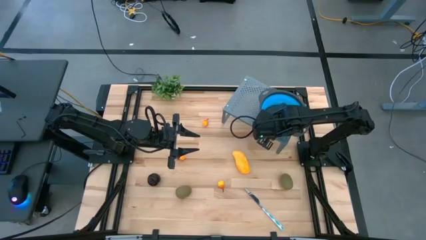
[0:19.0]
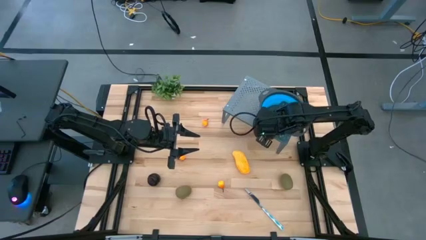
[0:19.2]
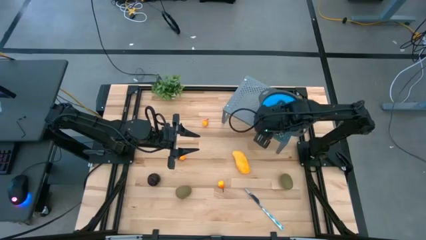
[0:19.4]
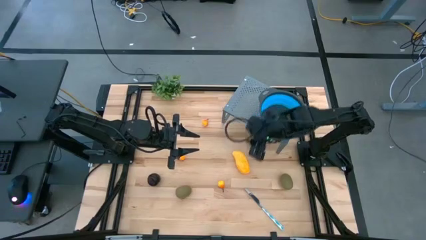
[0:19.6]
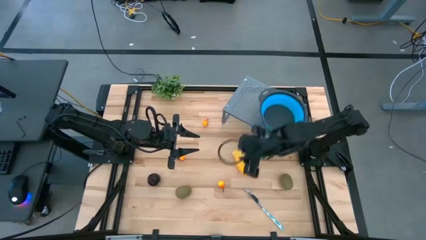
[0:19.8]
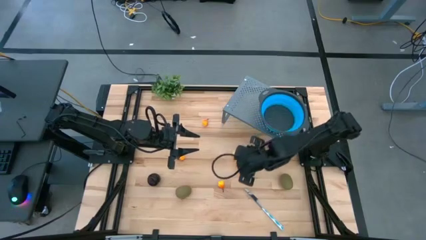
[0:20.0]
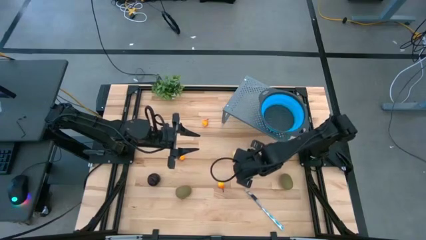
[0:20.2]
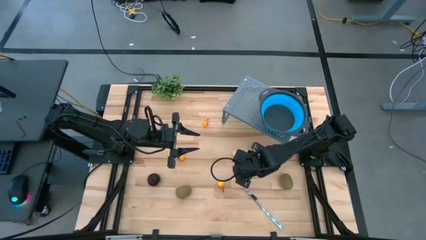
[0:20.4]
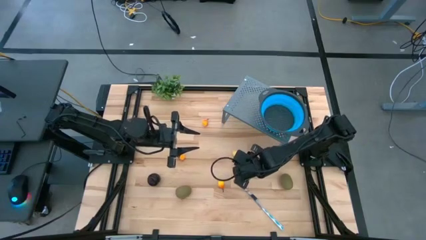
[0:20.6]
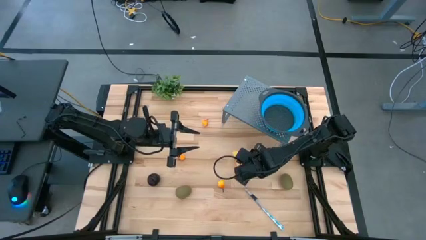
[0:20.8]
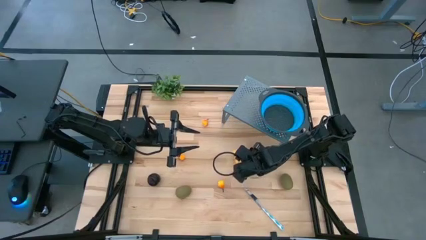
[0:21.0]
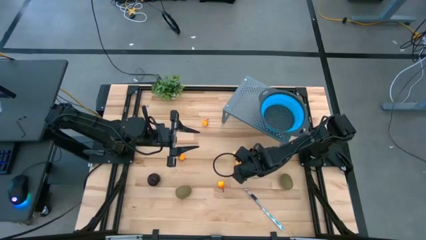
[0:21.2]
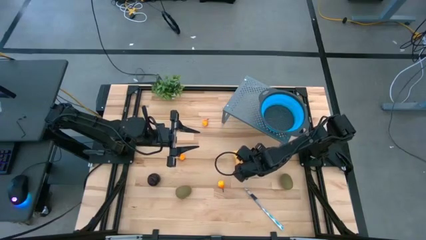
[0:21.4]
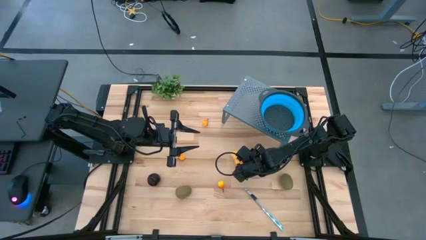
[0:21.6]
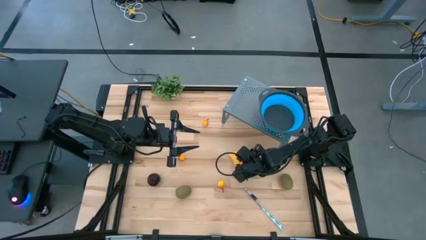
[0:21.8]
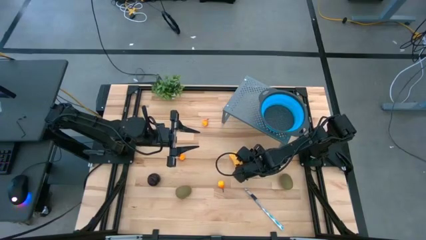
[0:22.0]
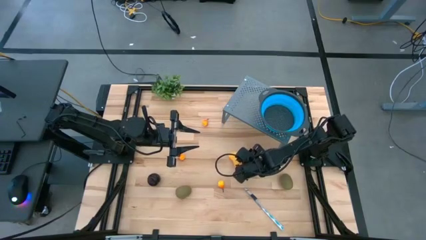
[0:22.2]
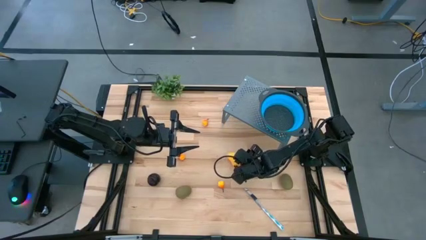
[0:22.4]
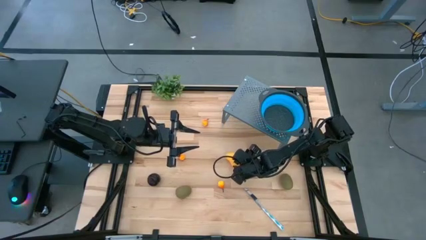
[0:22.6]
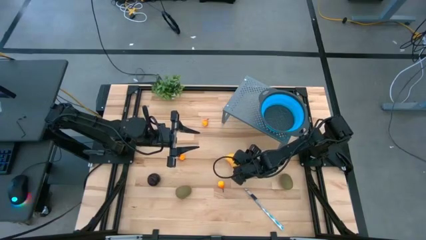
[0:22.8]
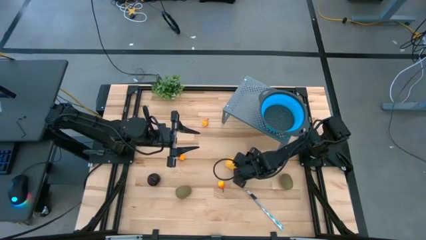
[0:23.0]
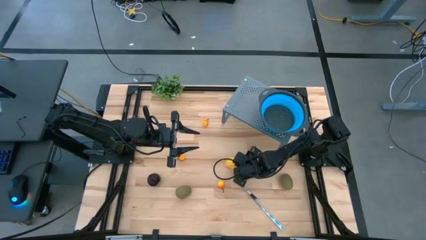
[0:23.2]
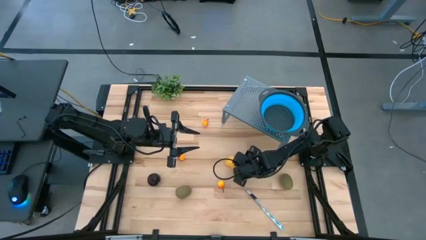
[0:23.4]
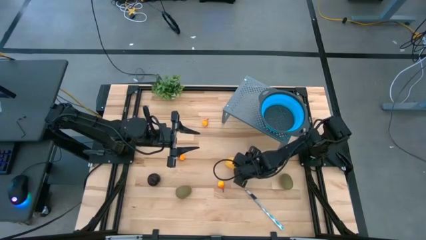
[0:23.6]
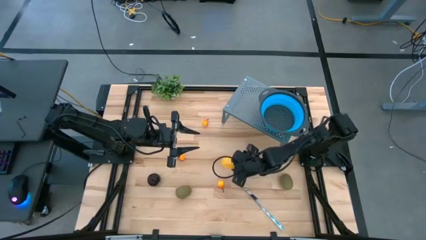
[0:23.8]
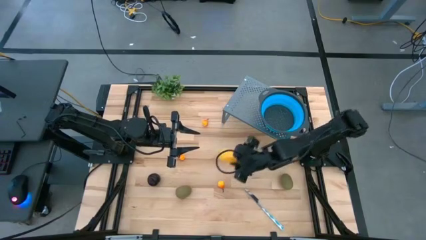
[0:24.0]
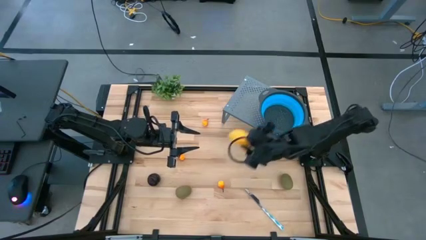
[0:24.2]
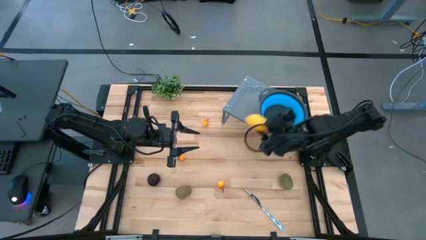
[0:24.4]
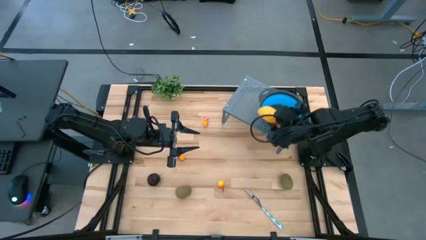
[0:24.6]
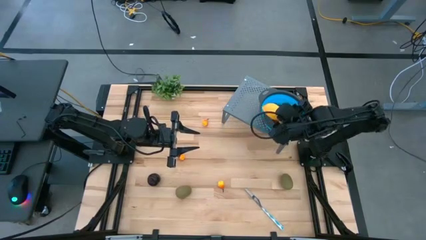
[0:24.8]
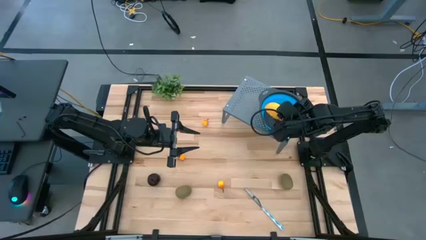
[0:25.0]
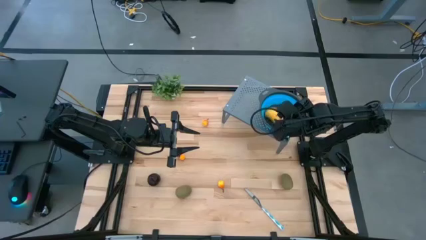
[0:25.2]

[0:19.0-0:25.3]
Task: Pick & Place Fruit
Put the mango into the strainer bowl on the shelf

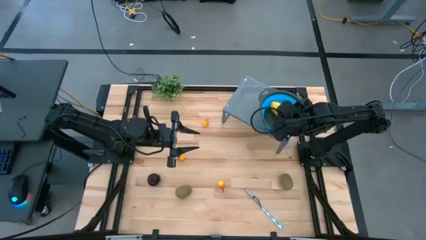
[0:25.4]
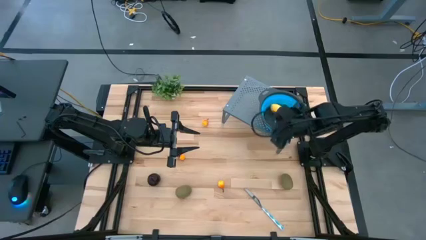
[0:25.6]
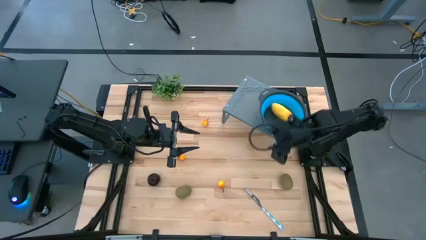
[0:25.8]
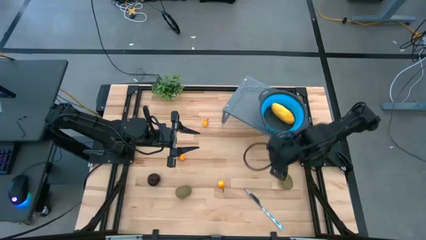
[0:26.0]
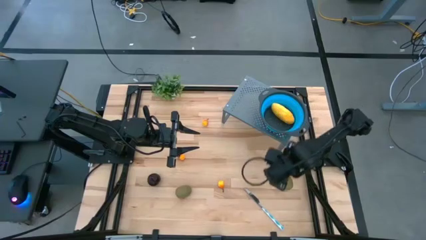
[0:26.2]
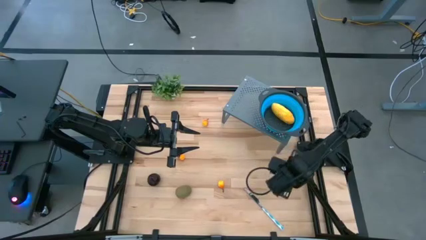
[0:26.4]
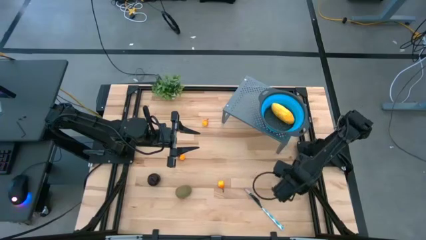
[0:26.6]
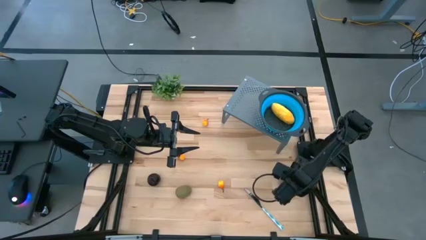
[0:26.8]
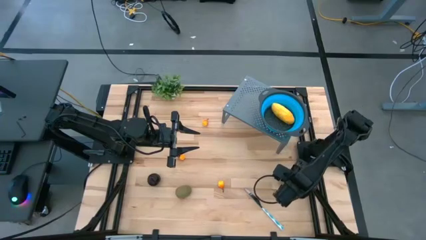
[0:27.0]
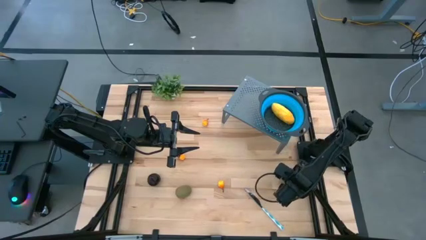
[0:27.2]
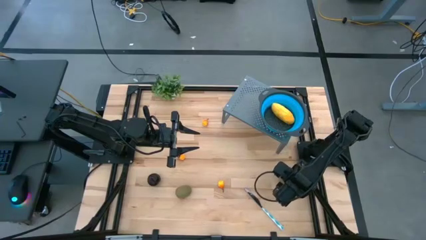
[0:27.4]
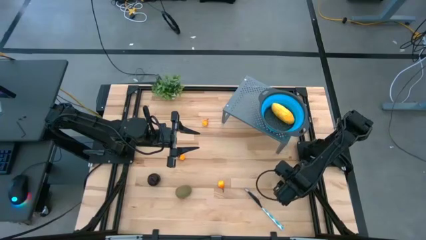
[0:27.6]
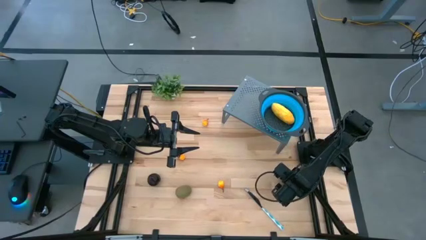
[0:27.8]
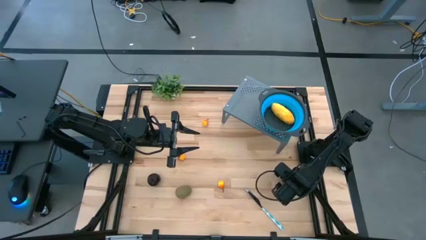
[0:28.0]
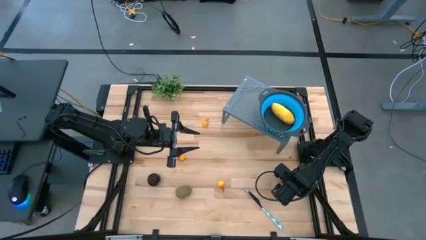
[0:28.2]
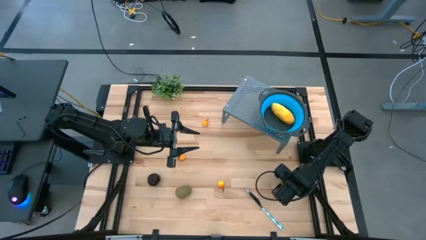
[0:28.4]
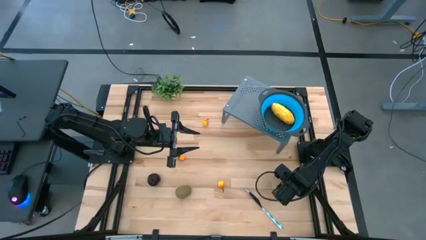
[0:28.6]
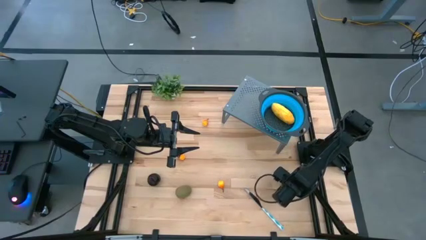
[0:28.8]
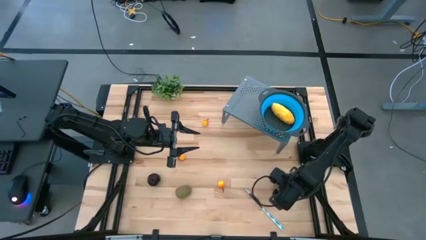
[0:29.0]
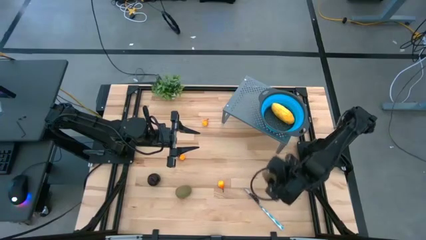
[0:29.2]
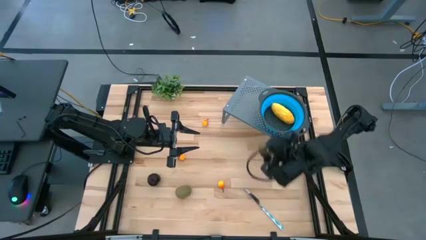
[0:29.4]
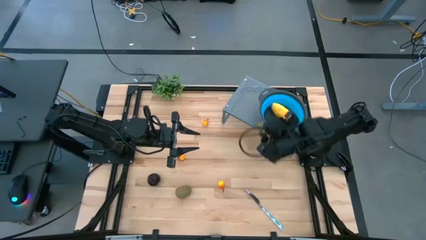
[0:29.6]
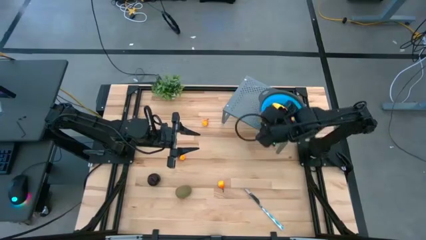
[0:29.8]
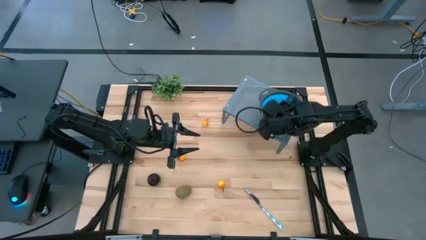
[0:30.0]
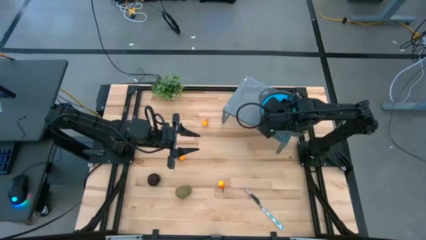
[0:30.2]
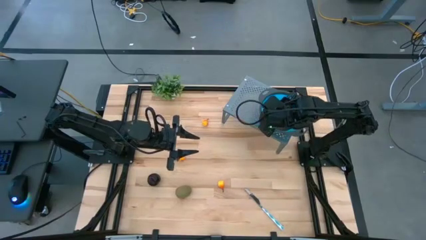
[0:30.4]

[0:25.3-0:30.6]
Put the right kiwi into the strainer bowl on the shelf
